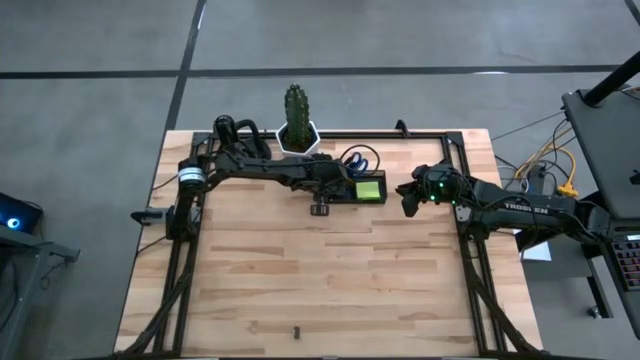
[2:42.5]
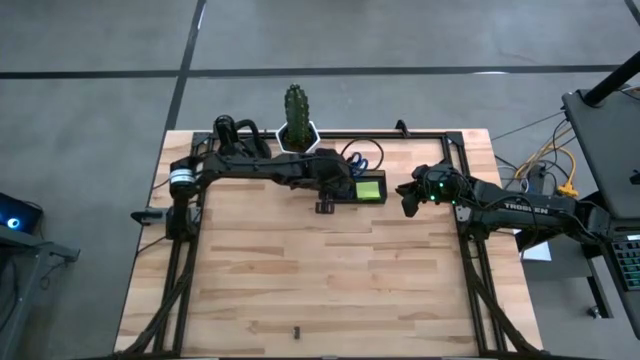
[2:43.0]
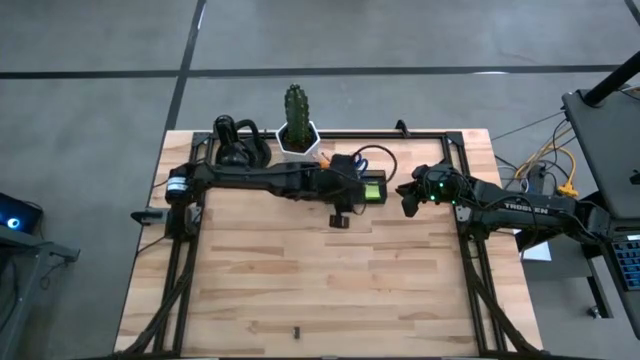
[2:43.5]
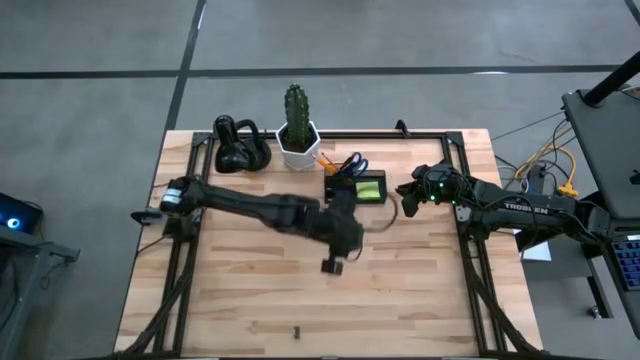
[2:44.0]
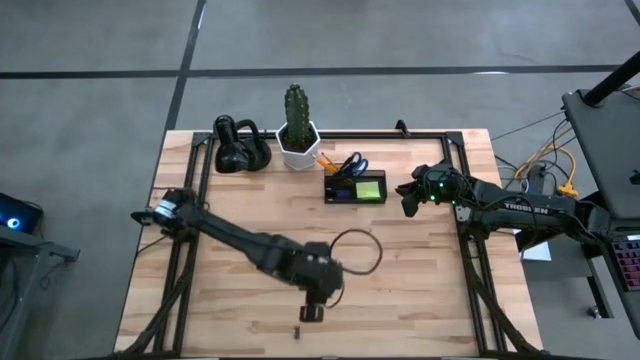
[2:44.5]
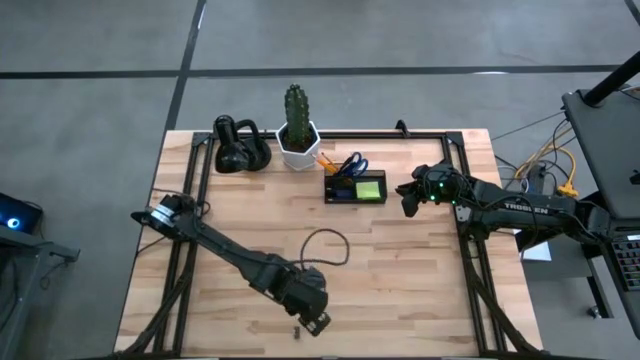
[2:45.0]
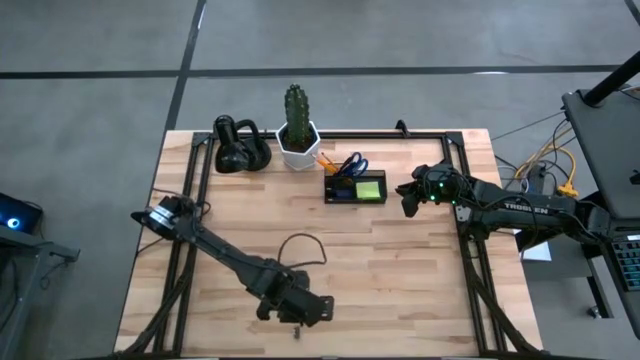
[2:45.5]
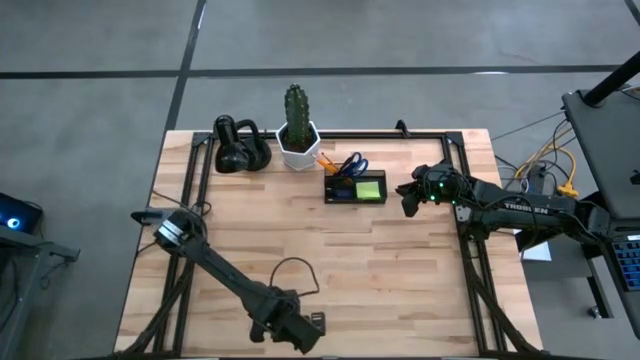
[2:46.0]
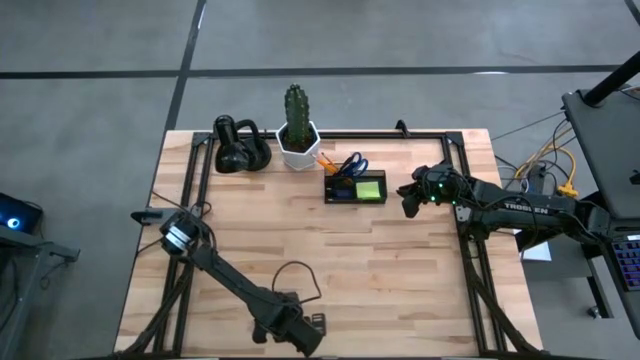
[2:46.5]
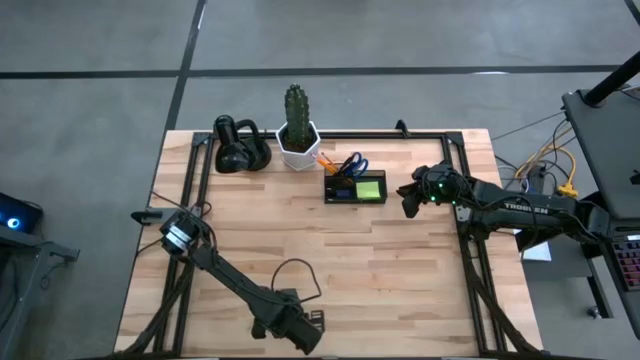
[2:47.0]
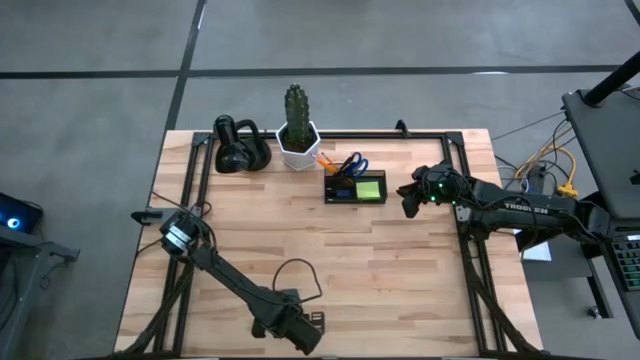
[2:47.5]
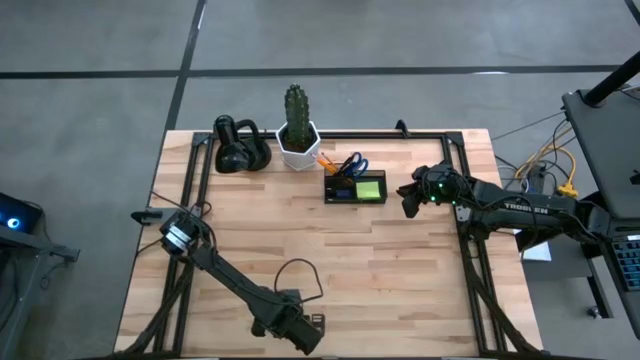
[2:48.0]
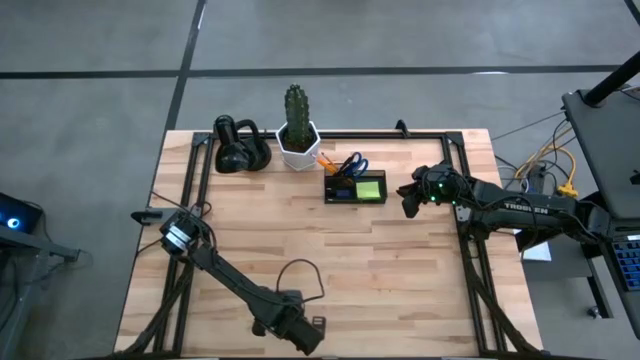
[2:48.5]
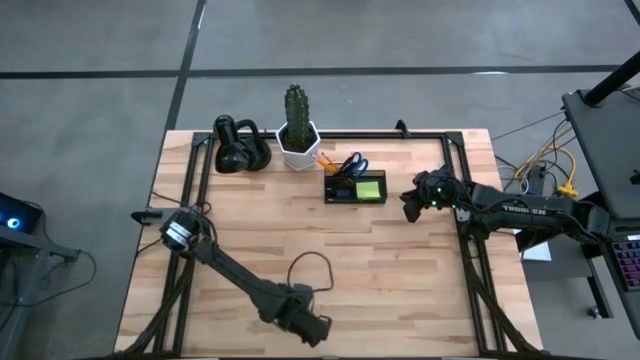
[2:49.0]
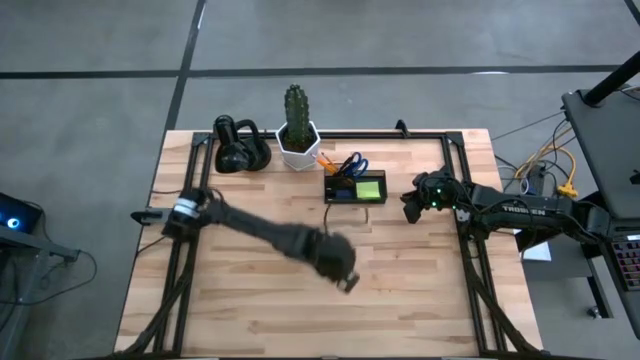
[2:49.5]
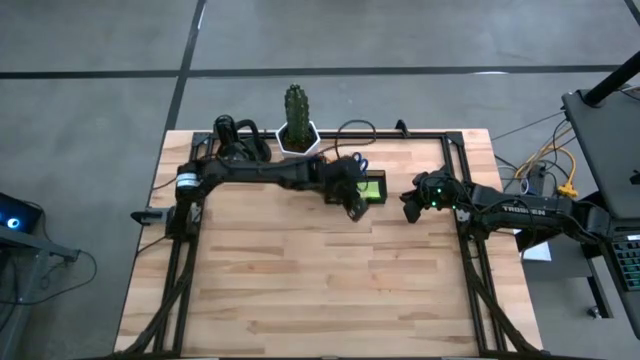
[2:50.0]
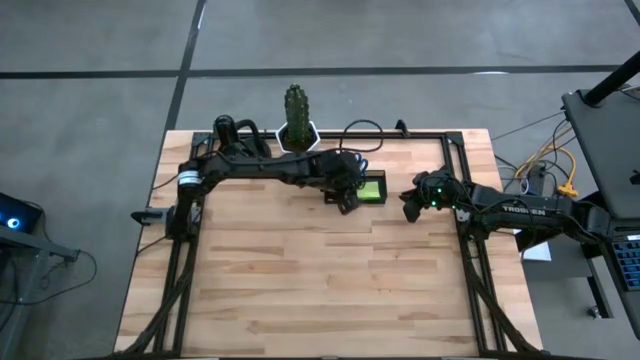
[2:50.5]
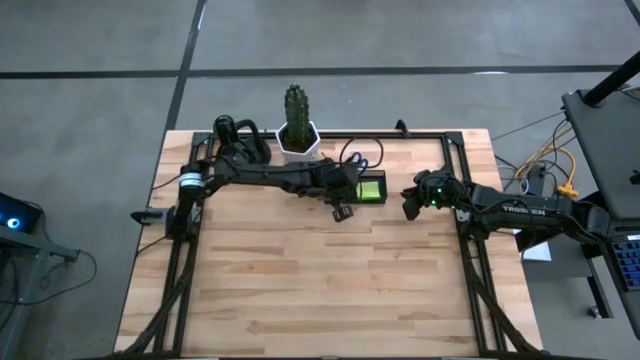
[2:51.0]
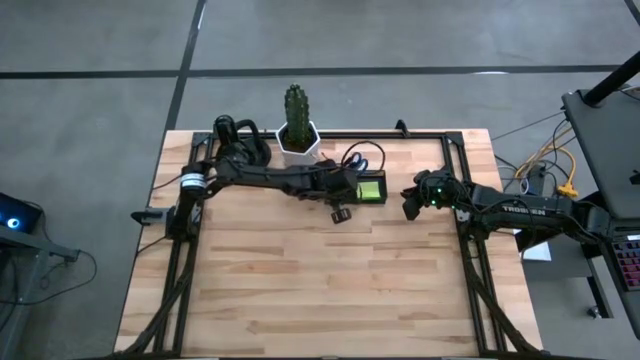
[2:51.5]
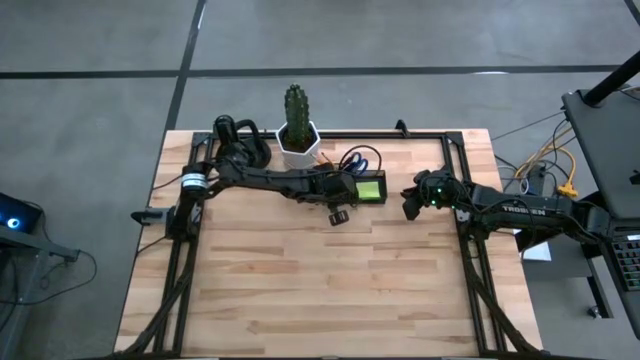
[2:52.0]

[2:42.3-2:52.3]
Task: Pick and place office supplies into organizer
Put the binder clip into the bottom section of the desk organizer

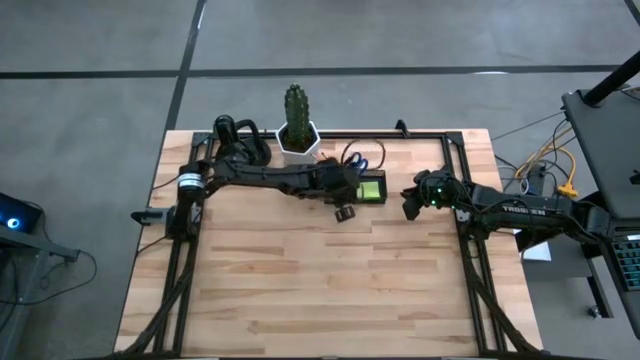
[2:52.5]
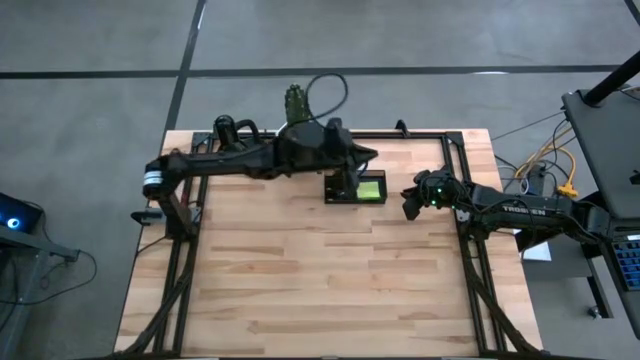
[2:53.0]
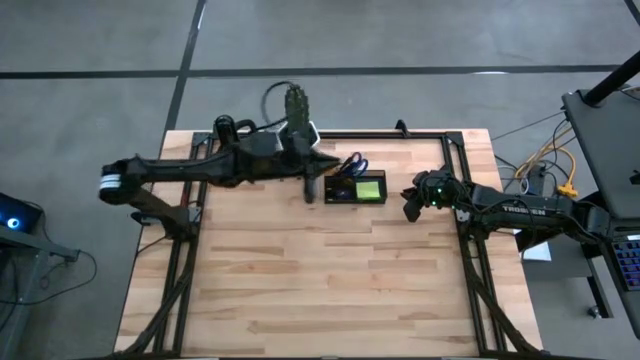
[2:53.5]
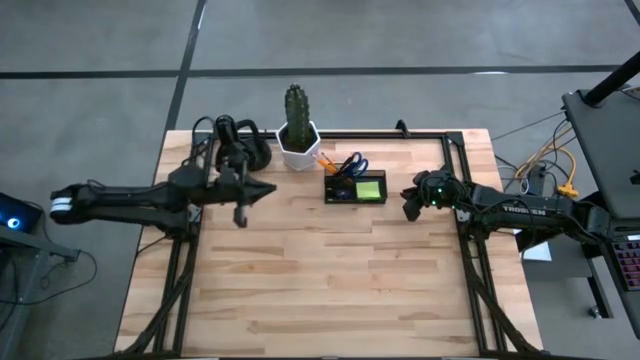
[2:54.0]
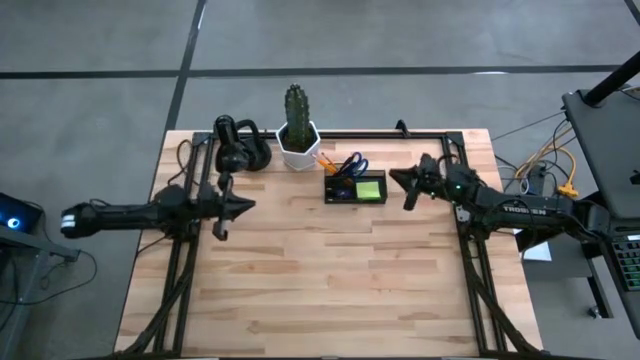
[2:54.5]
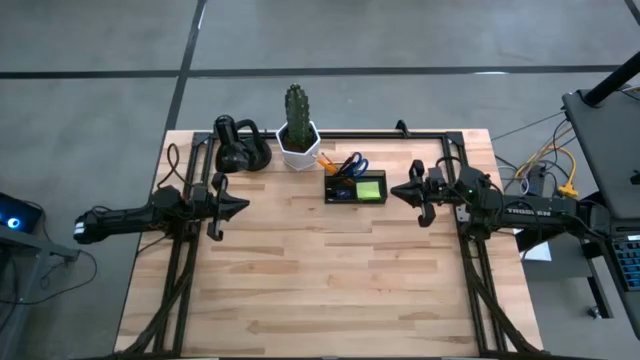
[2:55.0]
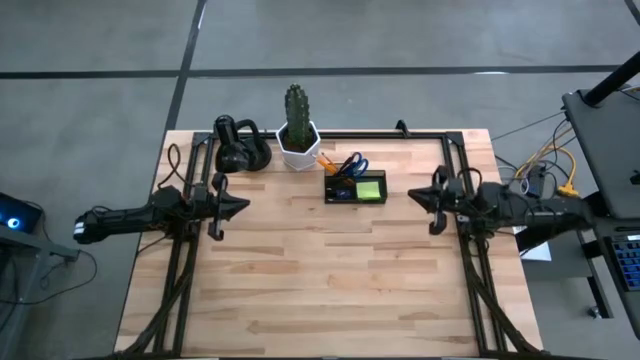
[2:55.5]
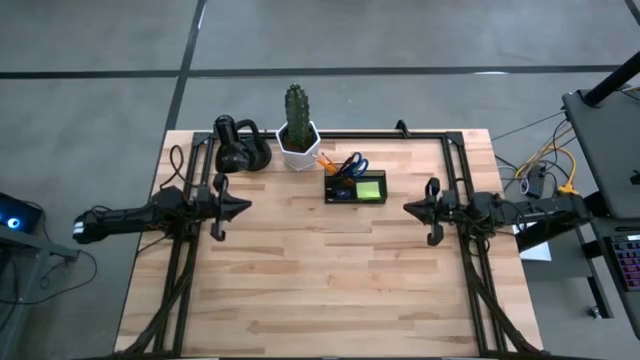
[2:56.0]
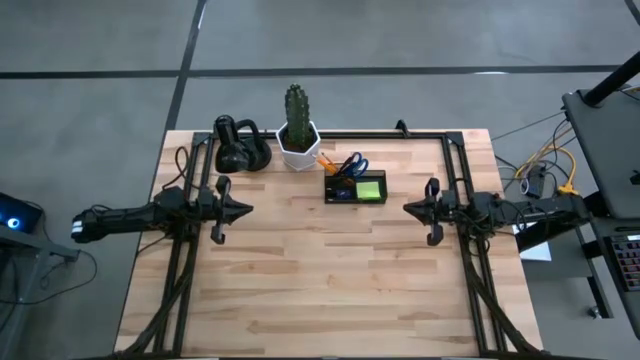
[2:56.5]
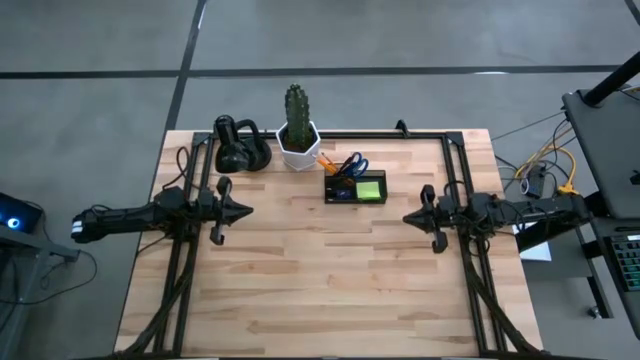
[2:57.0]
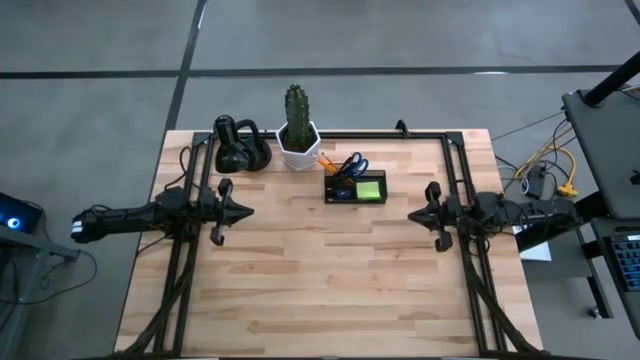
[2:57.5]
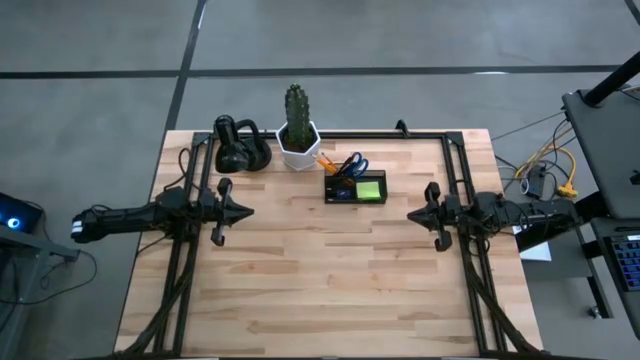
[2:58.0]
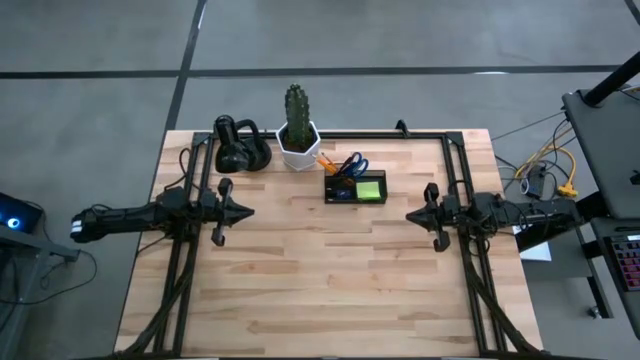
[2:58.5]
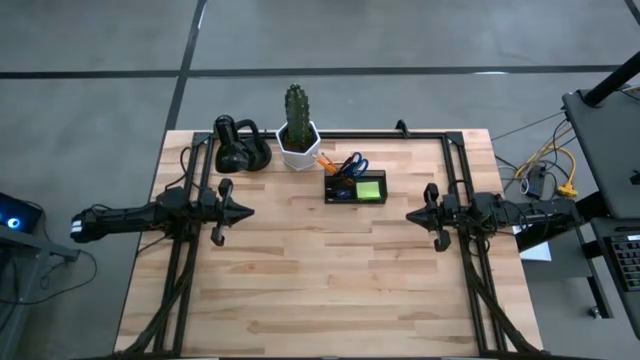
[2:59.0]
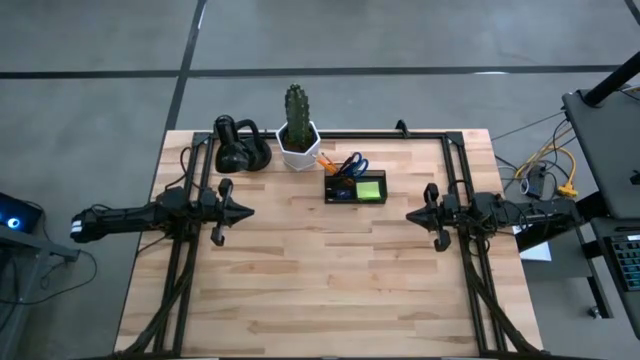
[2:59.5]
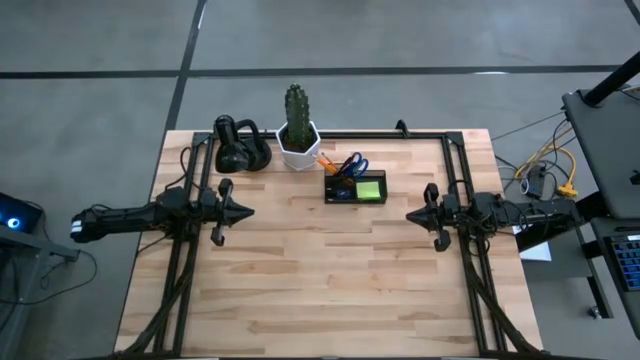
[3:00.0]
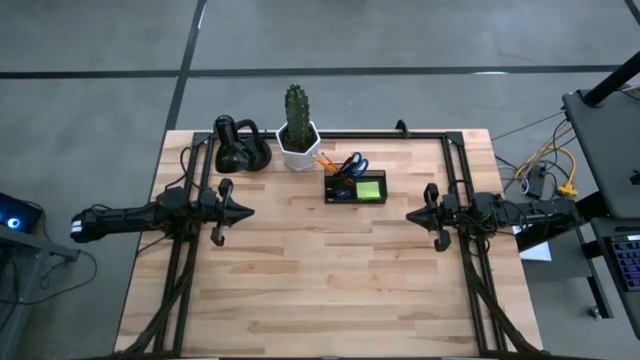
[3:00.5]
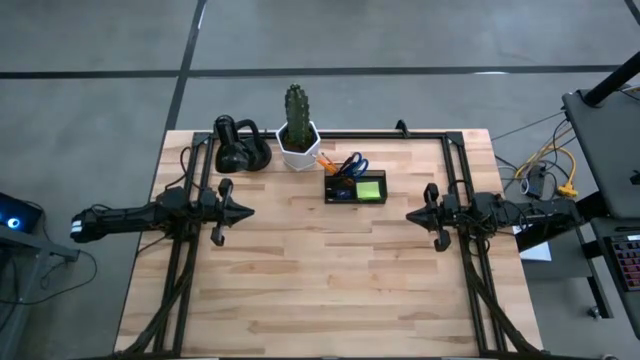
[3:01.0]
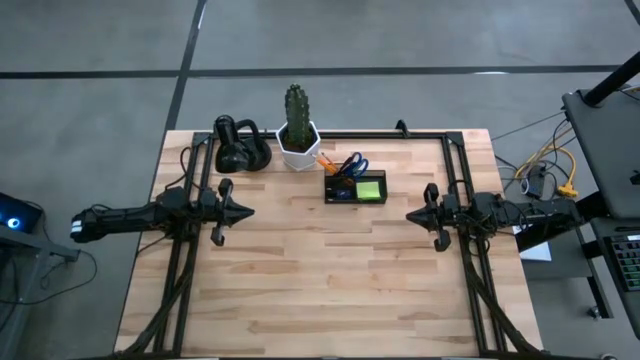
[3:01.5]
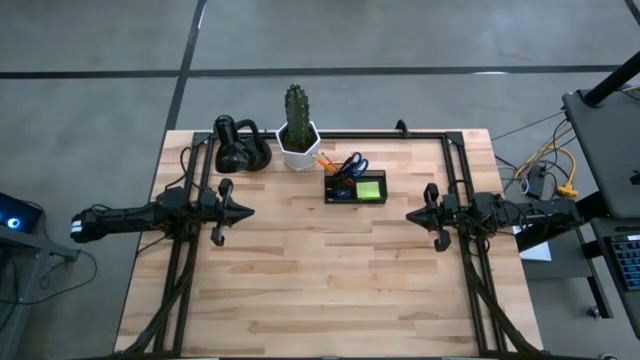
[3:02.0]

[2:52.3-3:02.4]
Return to Home Position

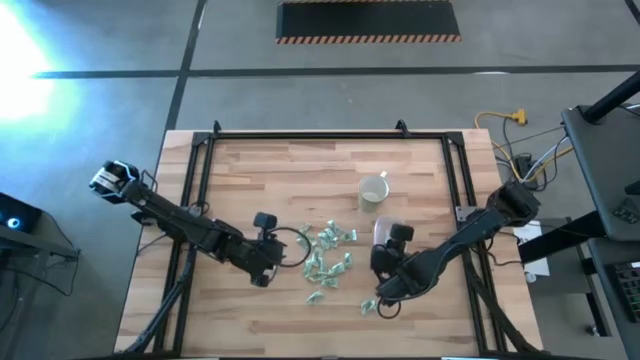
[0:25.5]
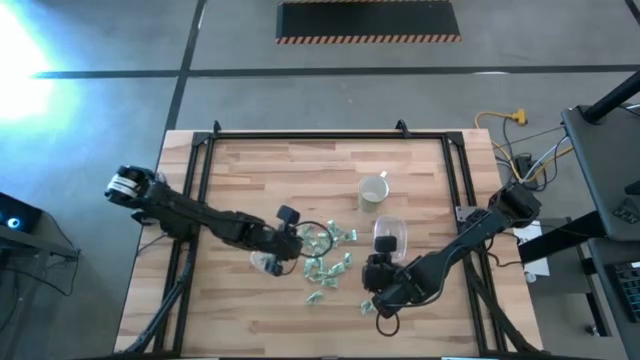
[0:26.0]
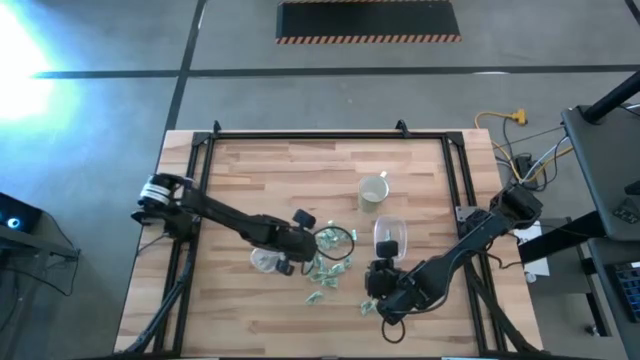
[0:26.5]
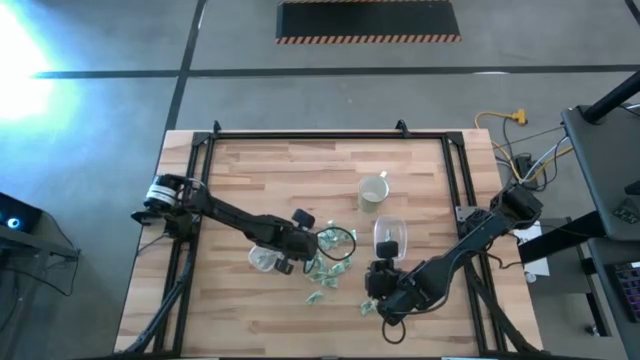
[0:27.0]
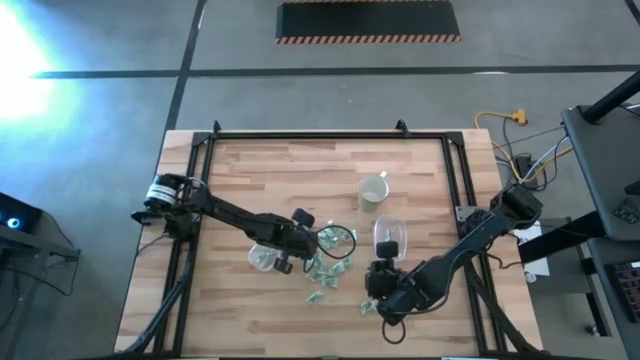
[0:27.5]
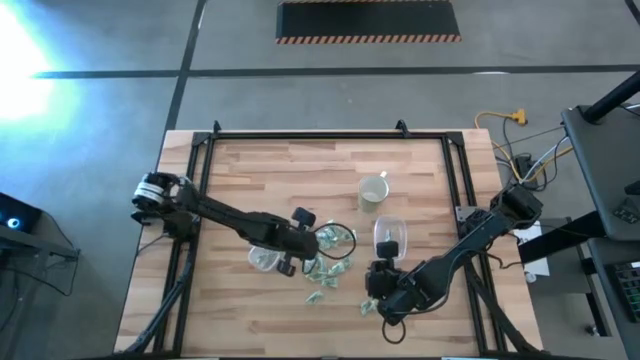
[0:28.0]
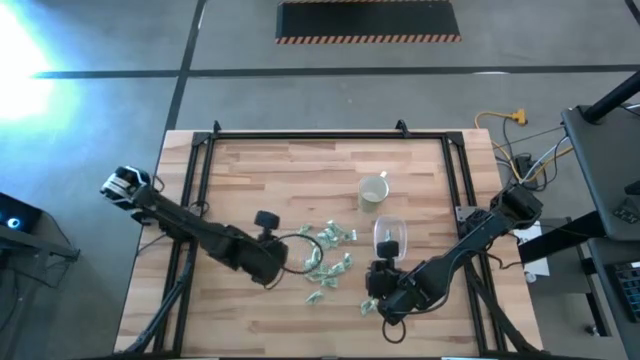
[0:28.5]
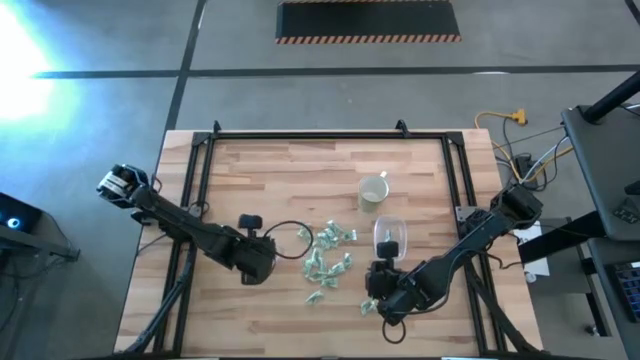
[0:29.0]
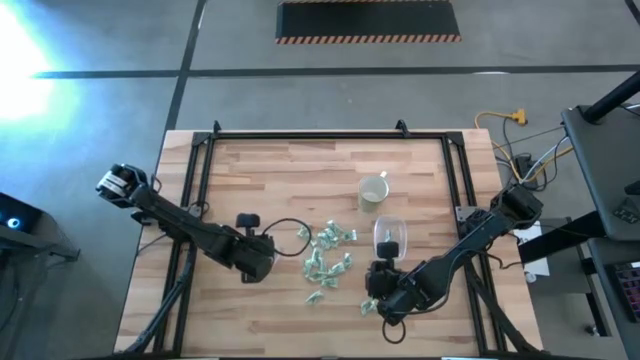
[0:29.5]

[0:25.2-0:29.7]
Task: Pick and place Stevia / Truvia into bins
Put the stevia packet into the left transparent container
